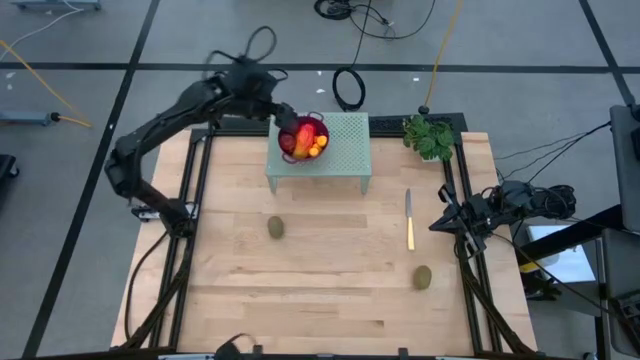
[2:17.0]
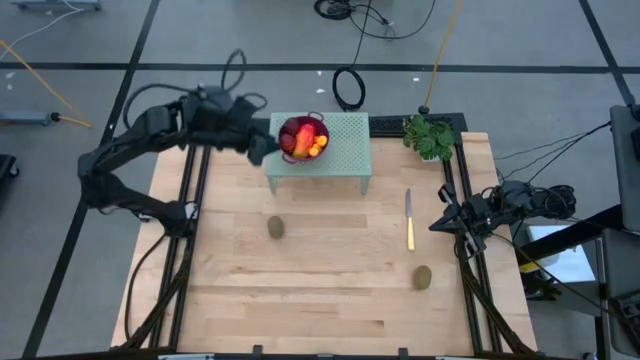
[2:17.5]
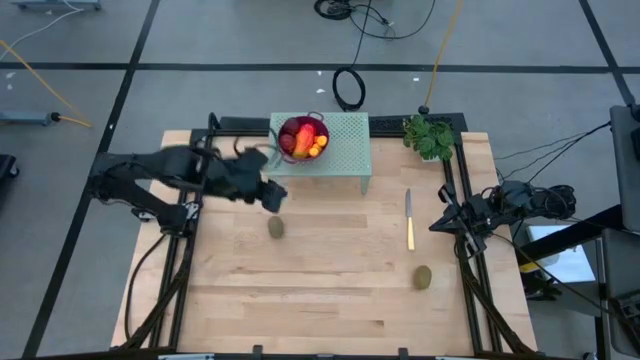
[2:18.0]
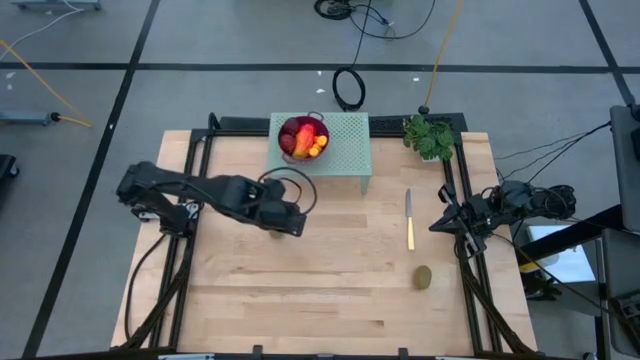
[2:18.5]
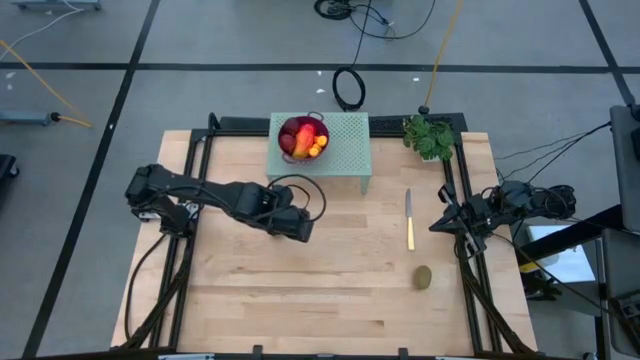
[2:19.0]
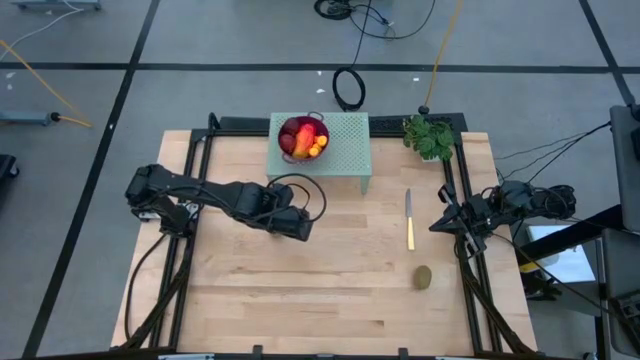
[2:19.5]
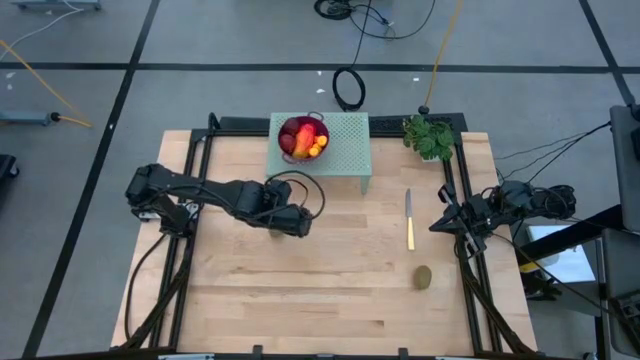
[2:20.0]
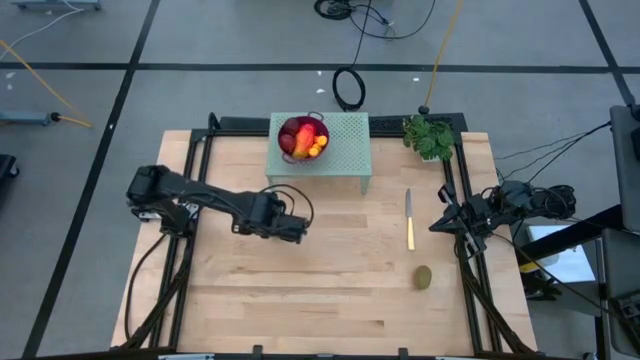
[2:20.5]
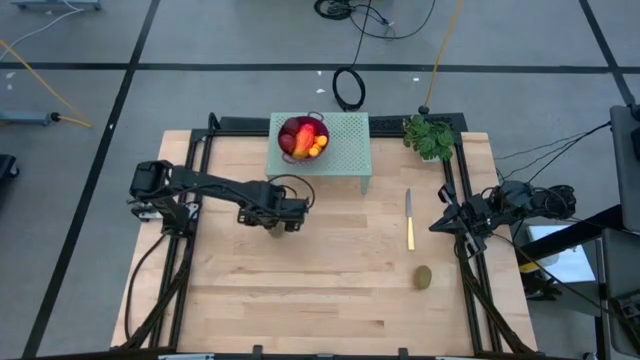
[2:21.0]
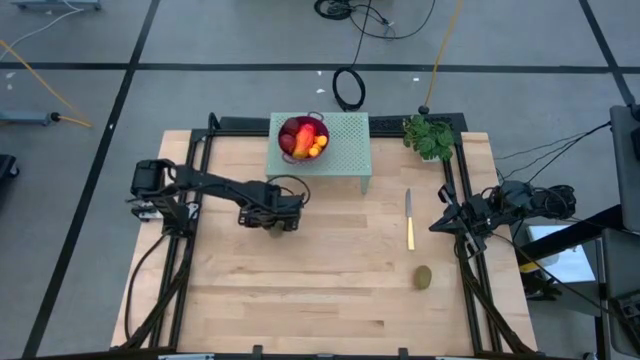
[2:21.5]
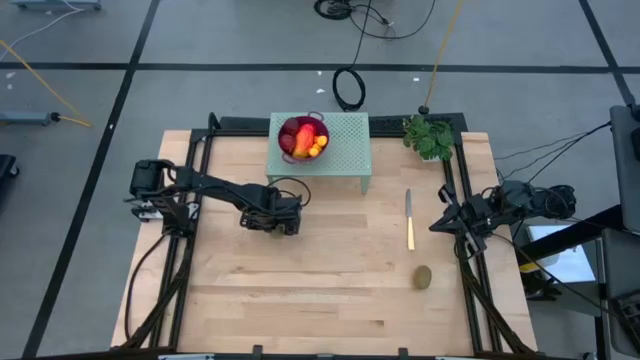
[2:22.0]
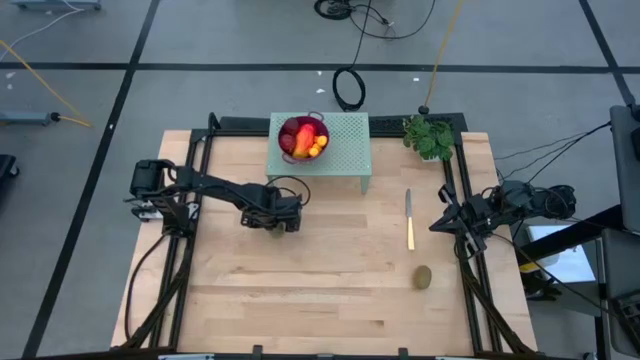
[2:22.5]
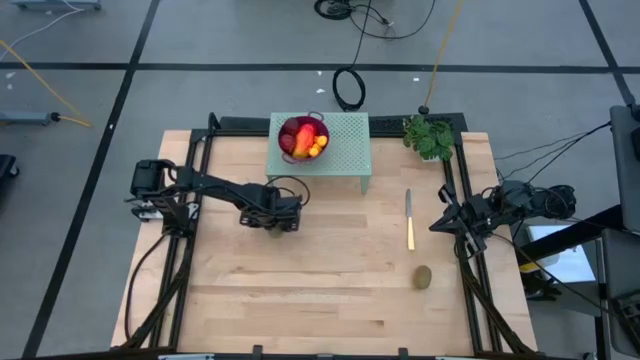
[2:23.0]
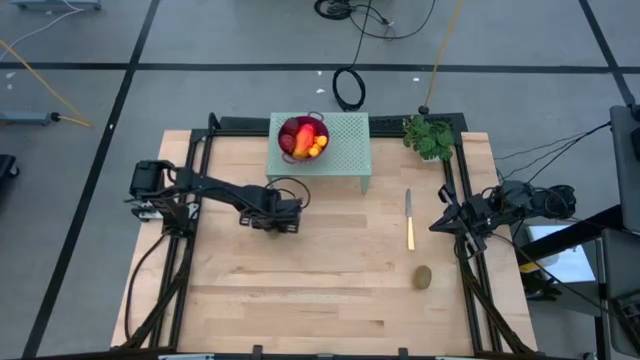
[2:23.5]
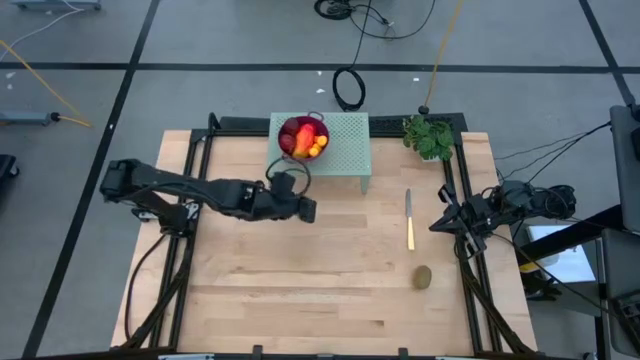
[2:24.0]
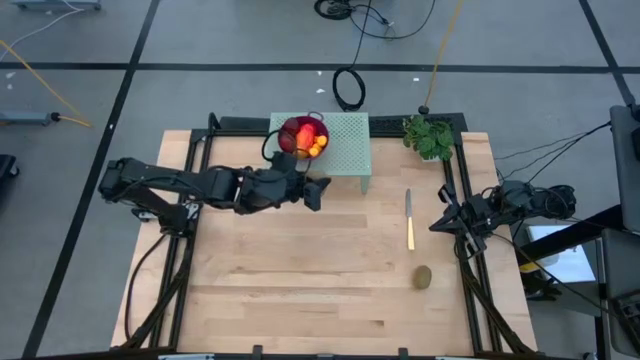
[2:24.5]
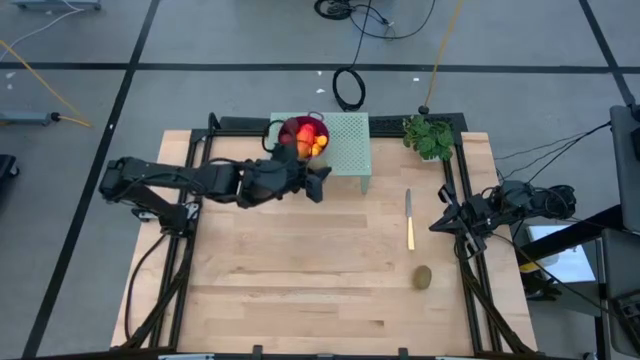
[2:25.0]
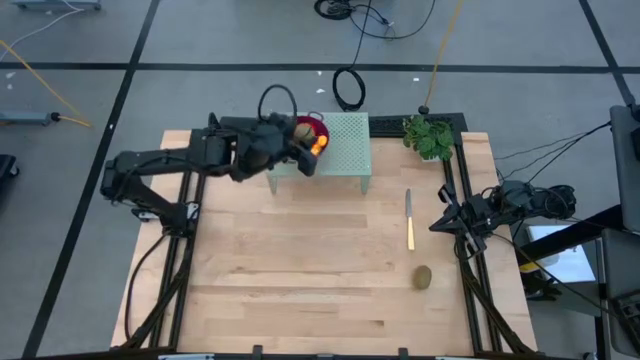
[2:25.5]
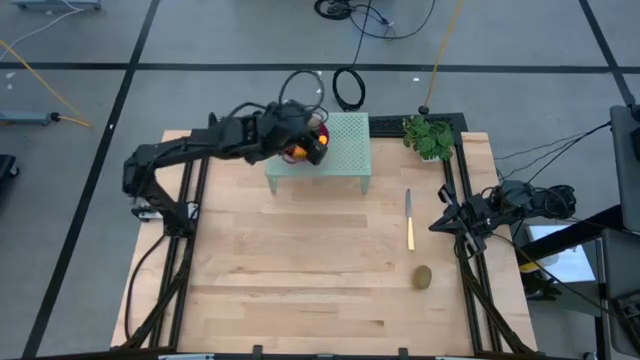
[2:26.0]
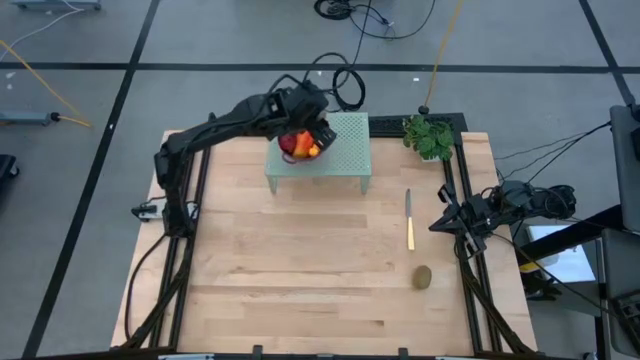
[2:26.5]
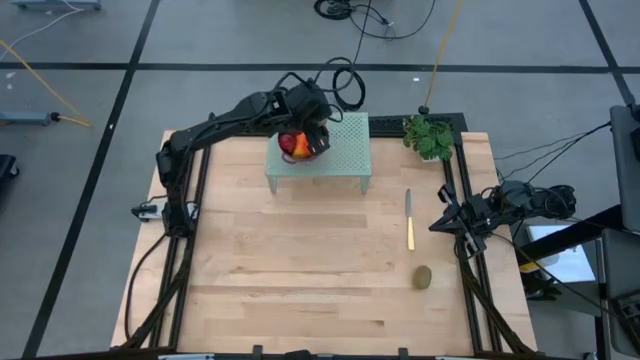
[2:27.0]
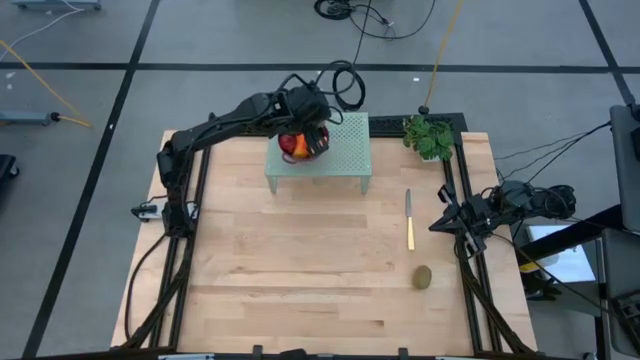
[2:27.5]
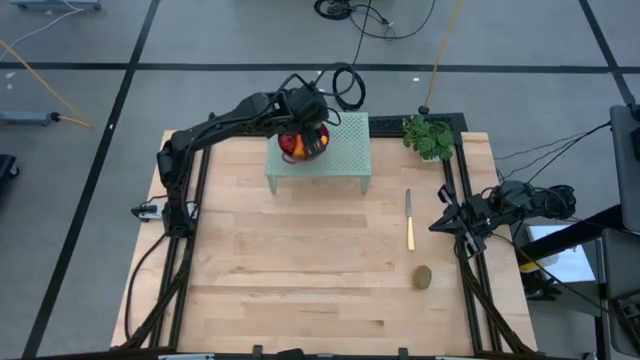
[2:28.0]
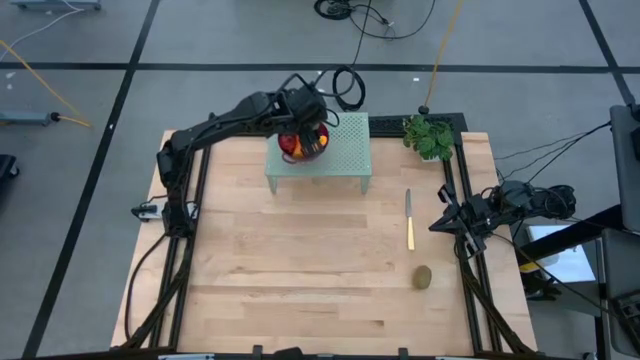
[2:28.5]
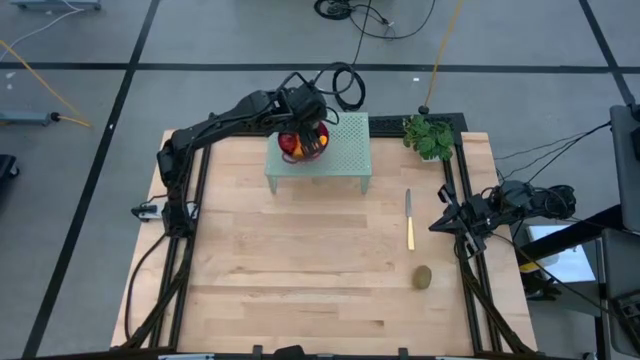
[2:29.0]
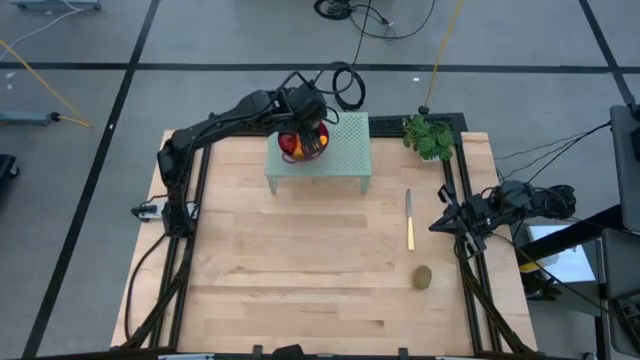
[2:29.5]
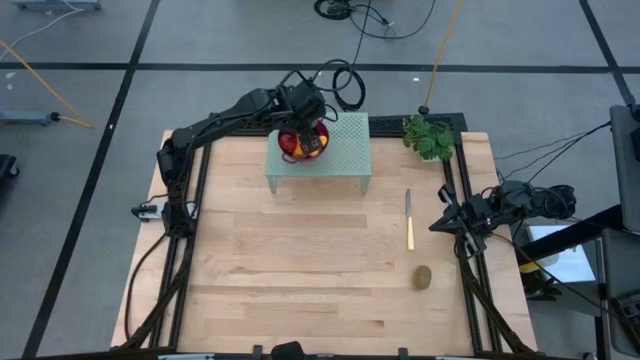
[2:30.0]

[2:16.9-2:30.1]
Task: Pick & Place Fruit
Put the top kiwi into the violet strainer bowl on the shelf

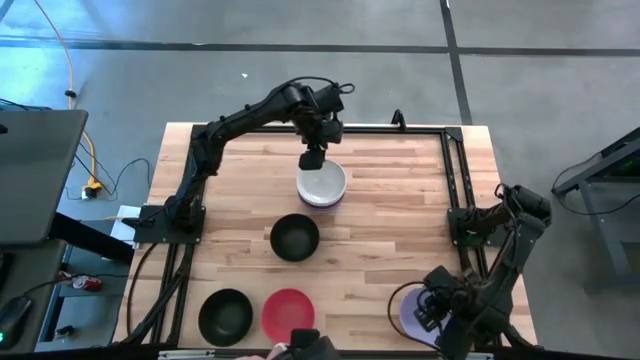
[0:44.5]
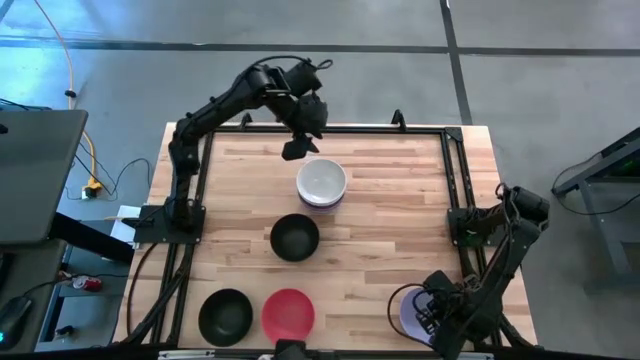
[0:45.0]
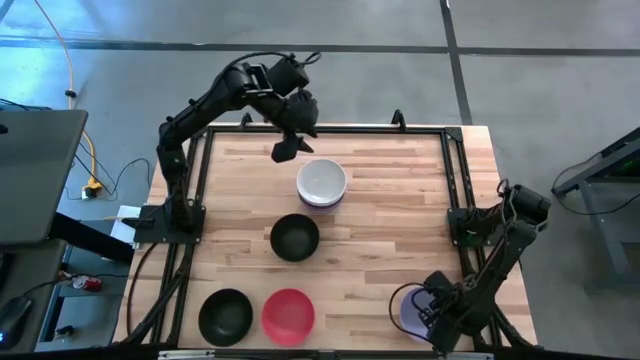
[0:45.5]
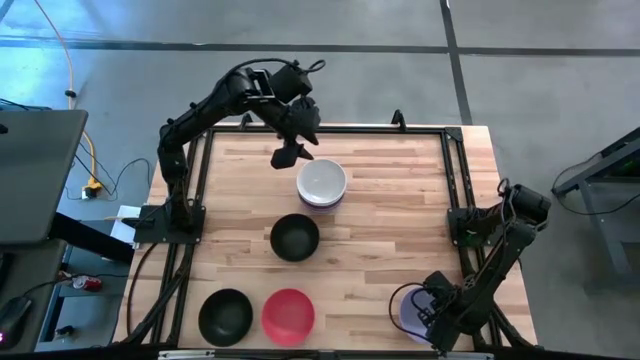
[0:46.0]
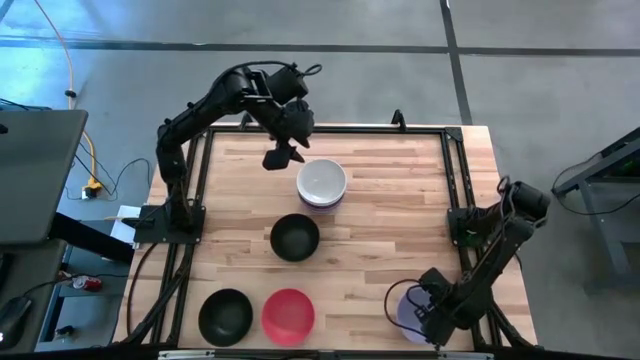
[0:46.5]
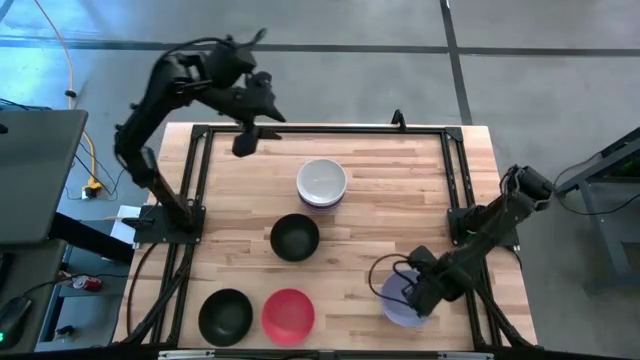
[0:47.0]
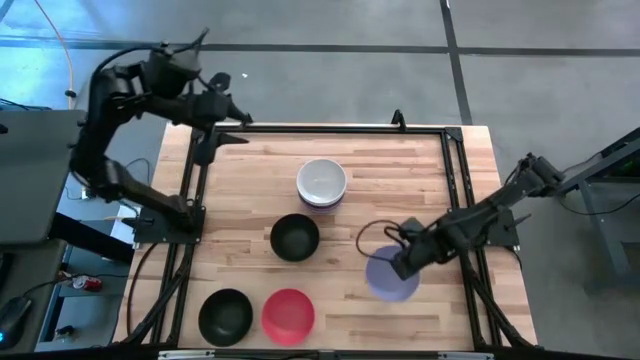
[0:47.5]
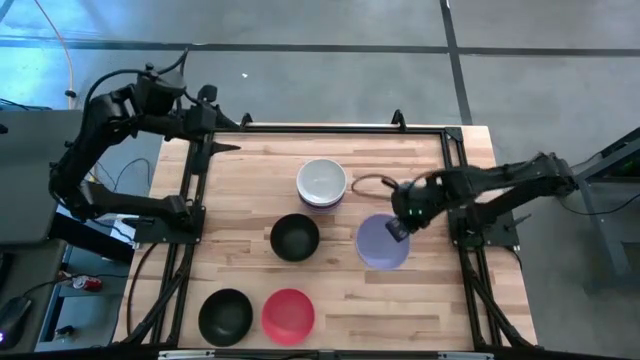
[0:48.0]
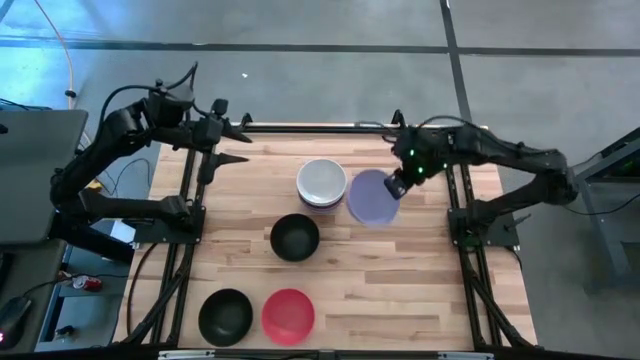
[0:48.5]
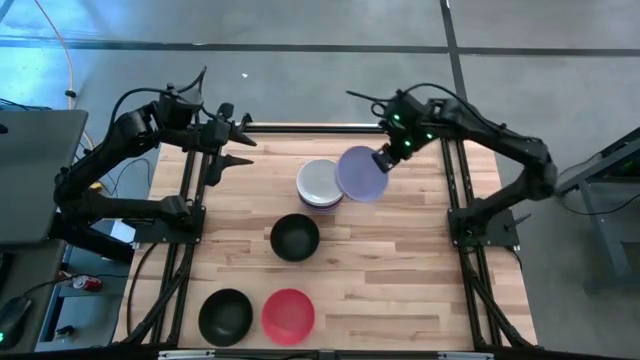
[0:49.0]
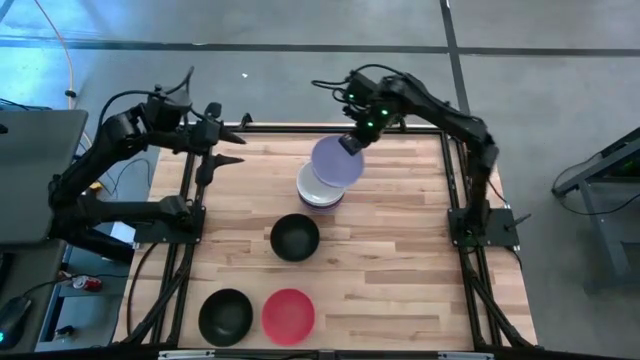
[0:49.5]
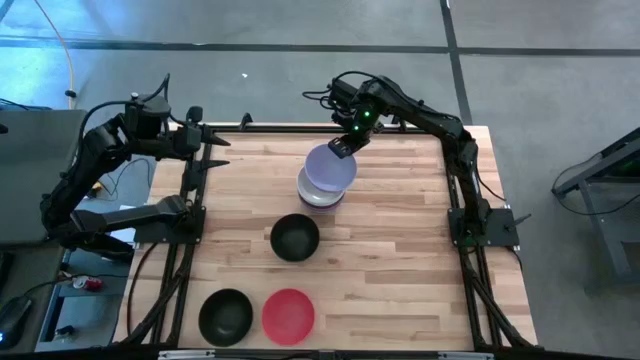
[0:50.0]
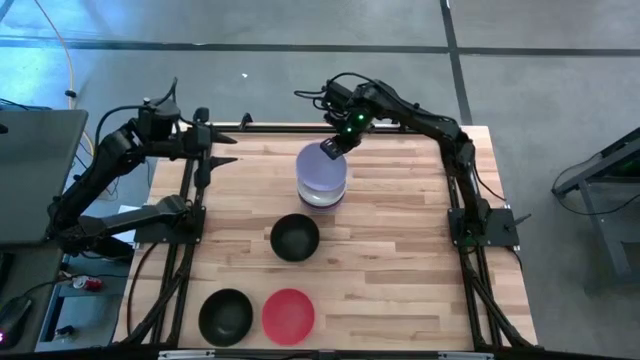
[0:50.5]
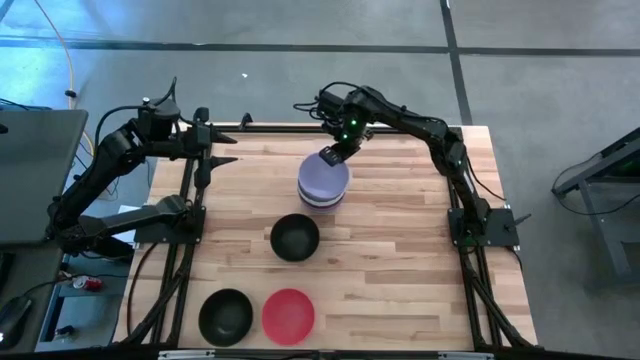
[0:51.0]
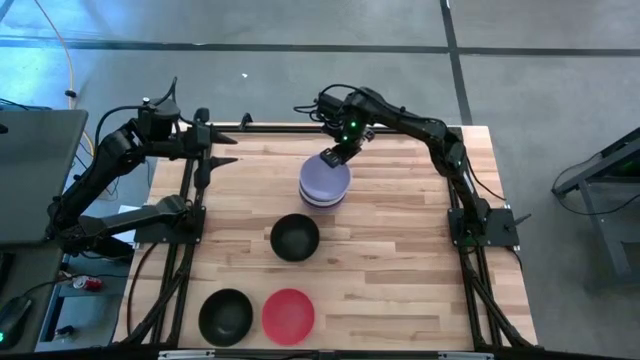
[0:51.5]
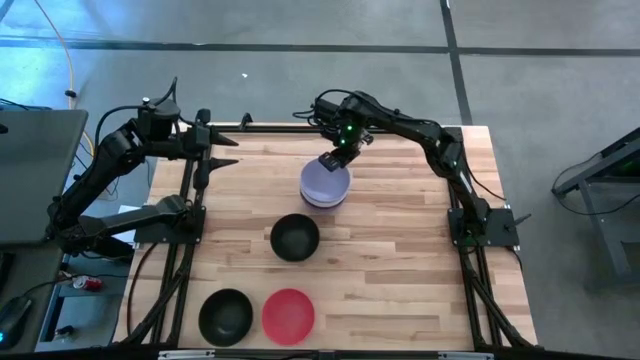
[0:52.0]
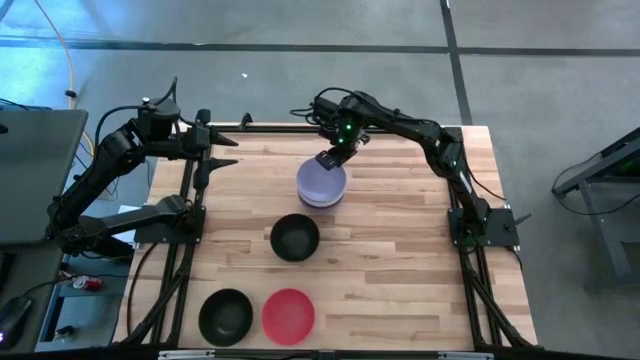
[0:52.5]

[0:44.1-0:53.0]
Task: Nest bowls inside each other
Stack the violet bowl on top of the white bowl
